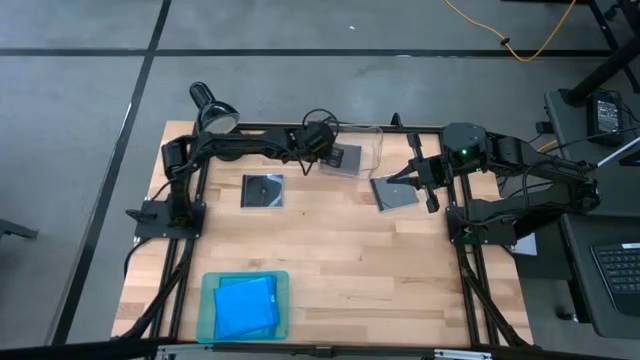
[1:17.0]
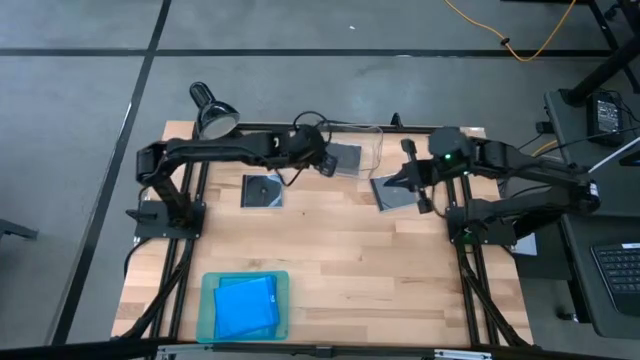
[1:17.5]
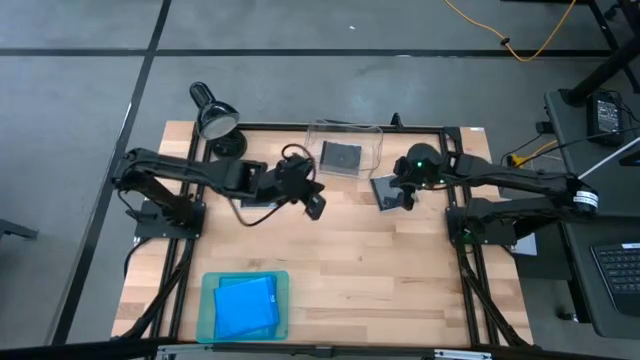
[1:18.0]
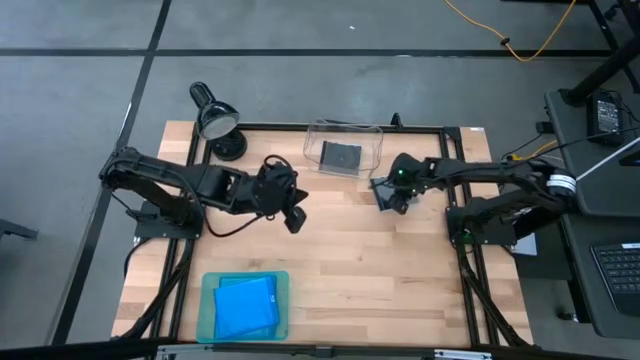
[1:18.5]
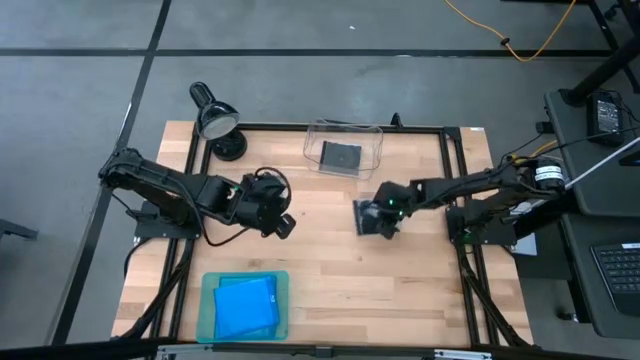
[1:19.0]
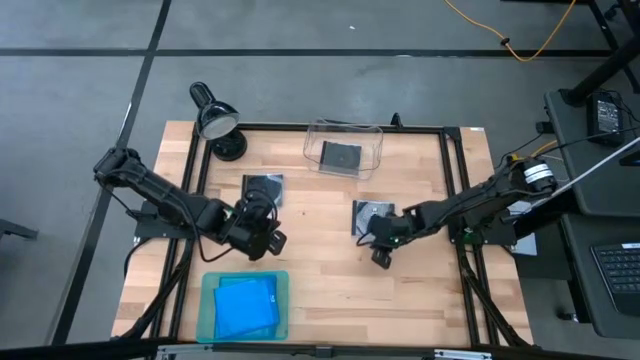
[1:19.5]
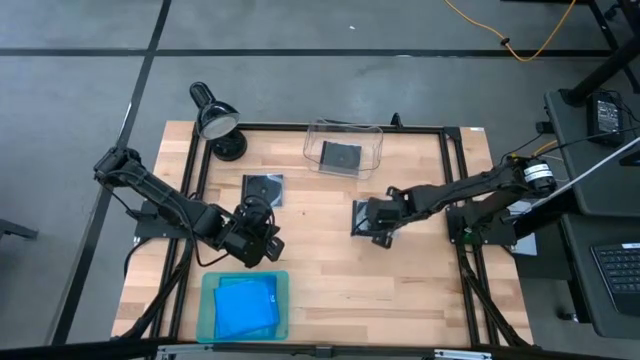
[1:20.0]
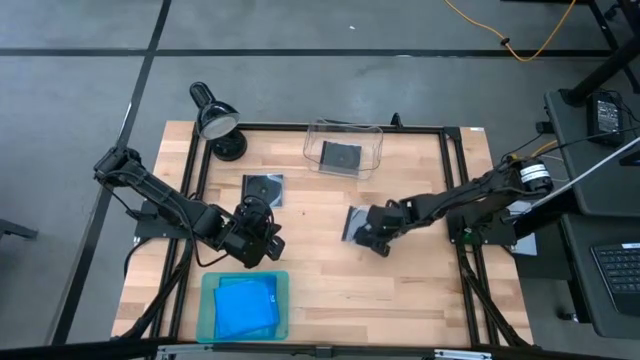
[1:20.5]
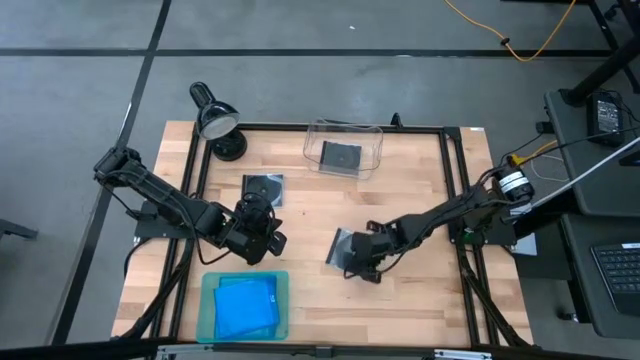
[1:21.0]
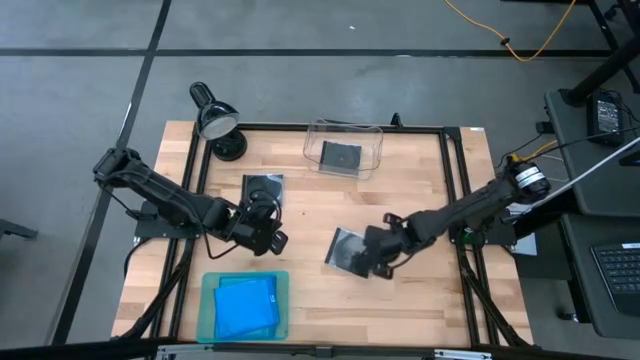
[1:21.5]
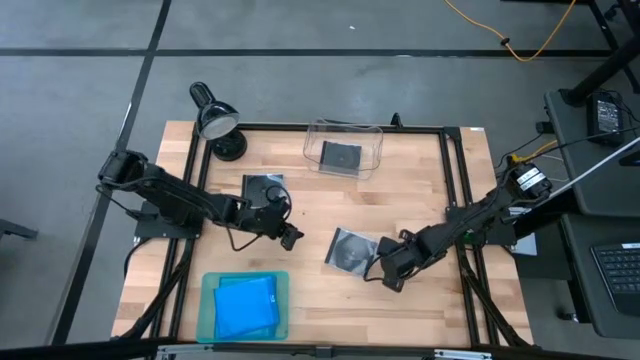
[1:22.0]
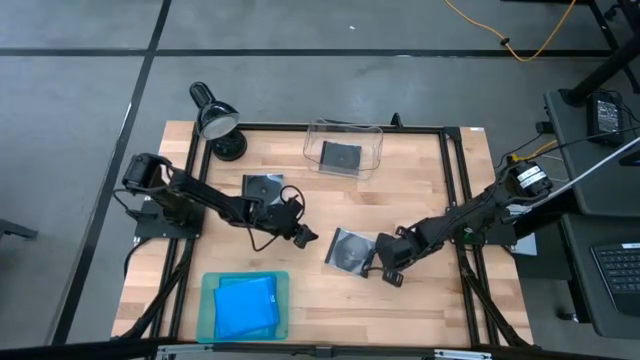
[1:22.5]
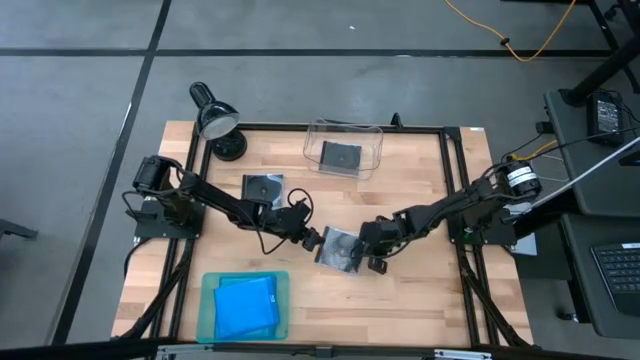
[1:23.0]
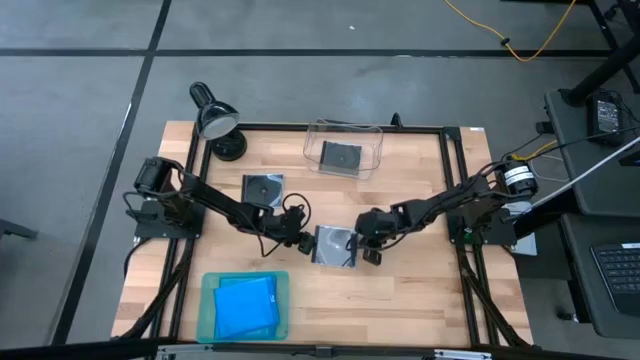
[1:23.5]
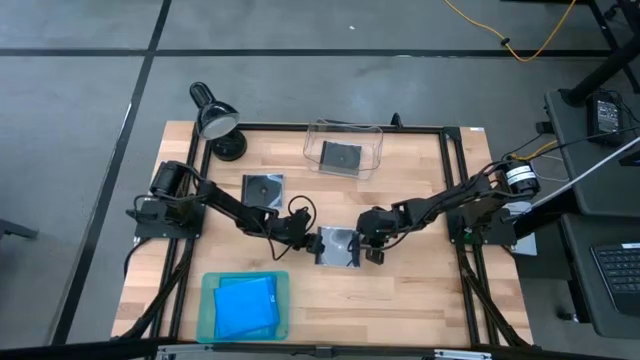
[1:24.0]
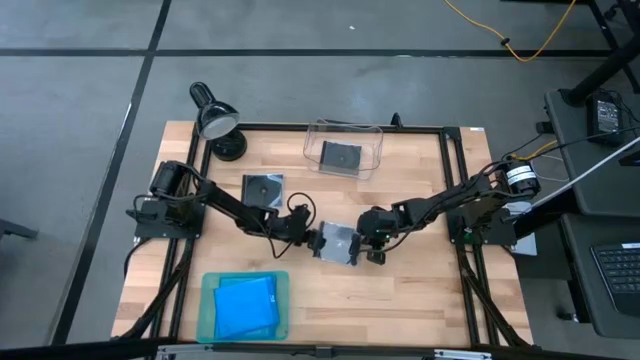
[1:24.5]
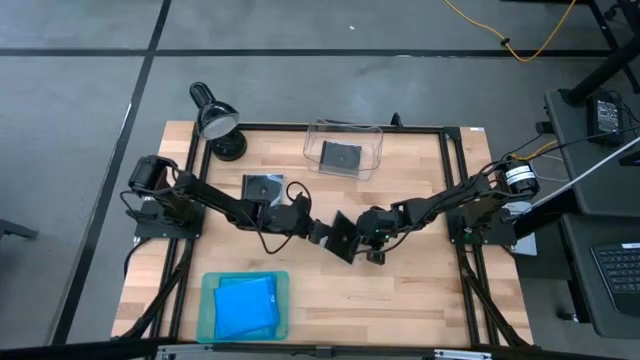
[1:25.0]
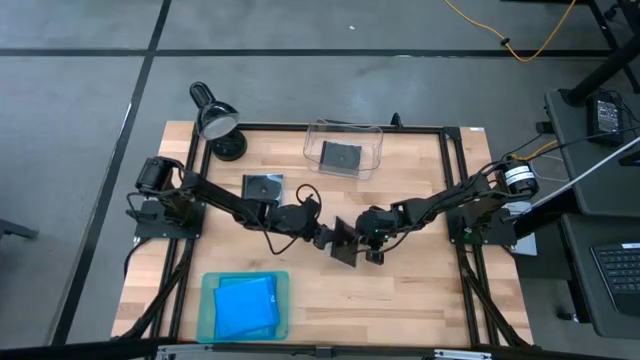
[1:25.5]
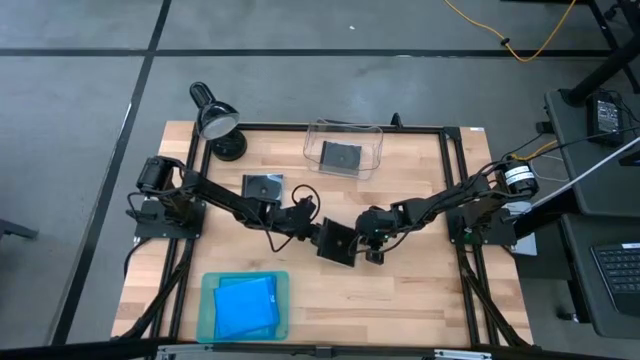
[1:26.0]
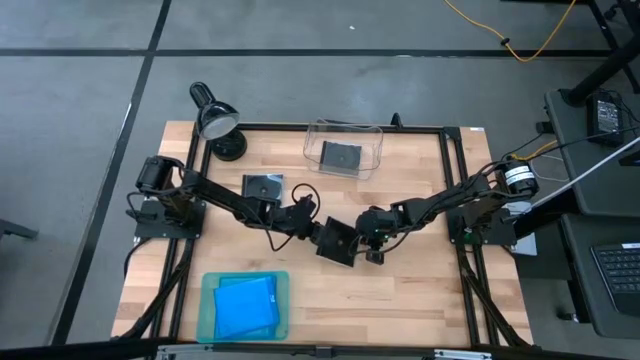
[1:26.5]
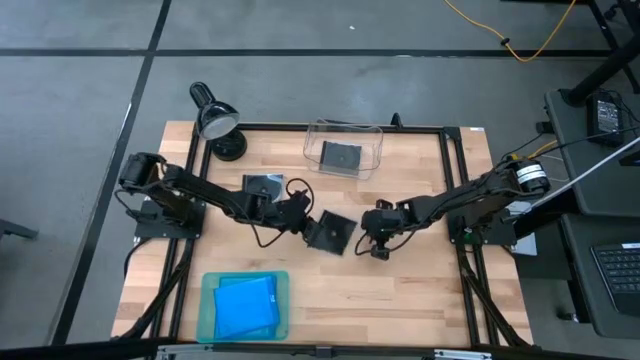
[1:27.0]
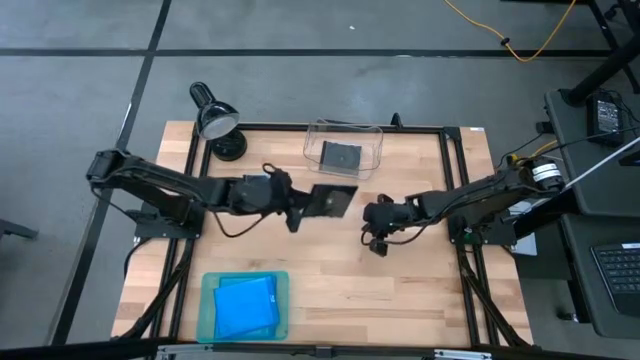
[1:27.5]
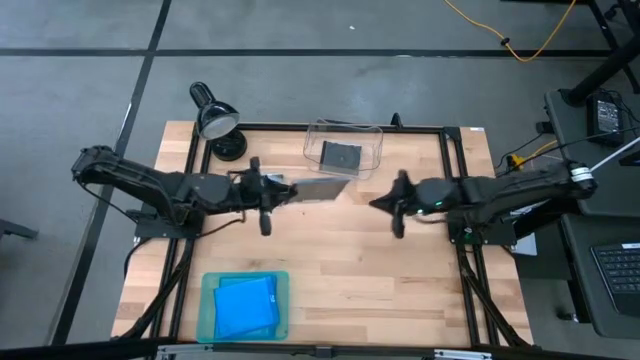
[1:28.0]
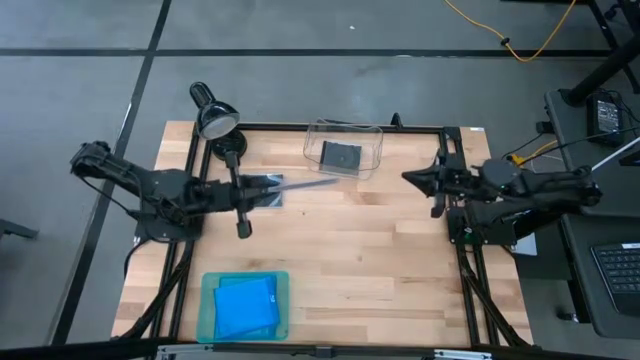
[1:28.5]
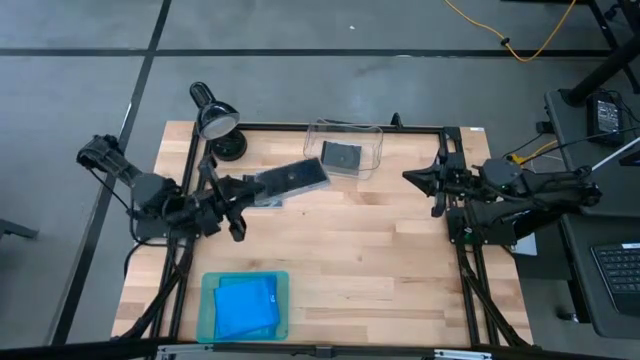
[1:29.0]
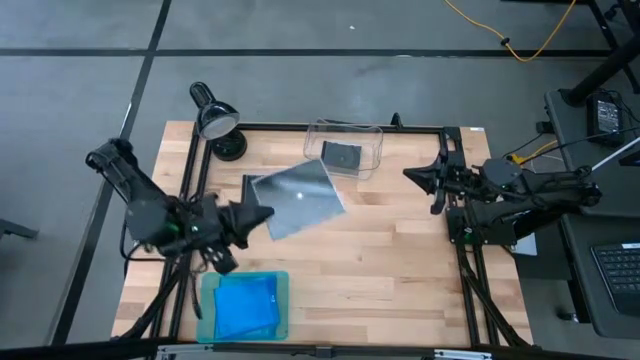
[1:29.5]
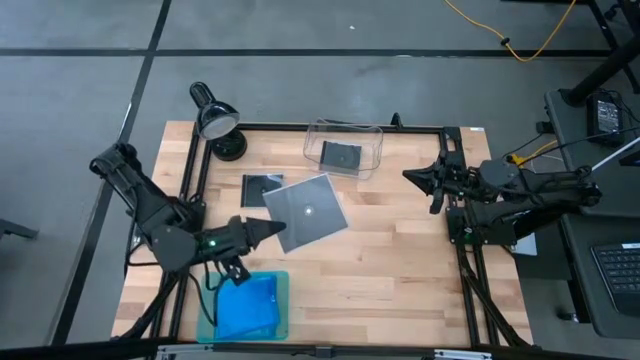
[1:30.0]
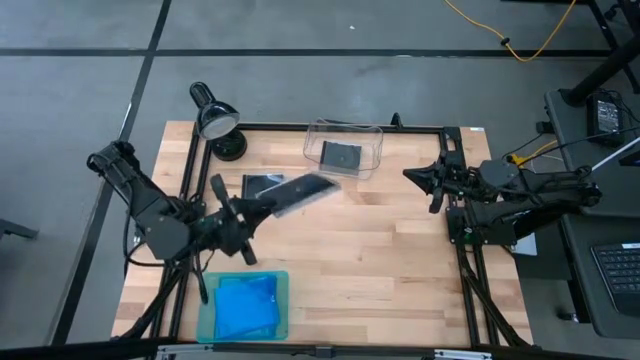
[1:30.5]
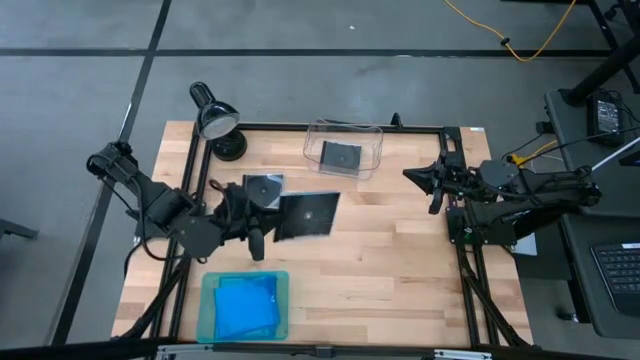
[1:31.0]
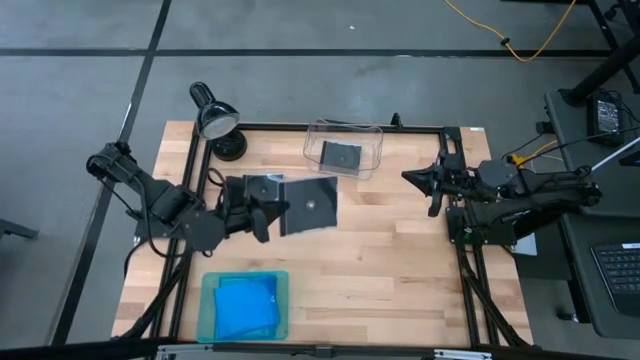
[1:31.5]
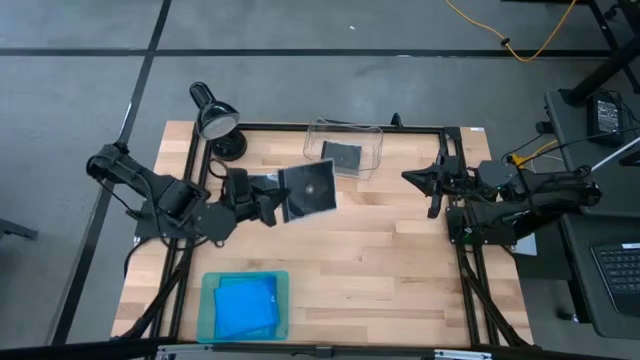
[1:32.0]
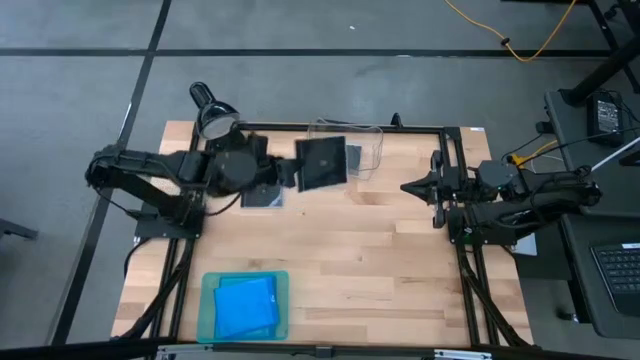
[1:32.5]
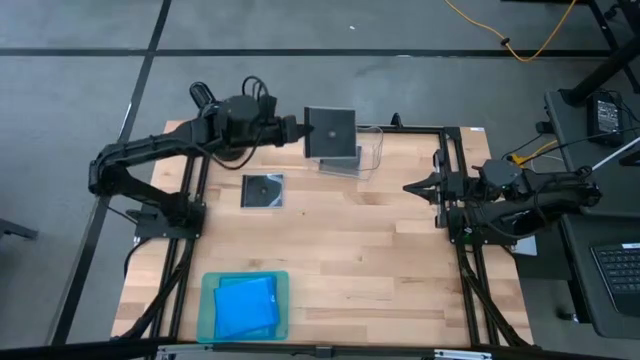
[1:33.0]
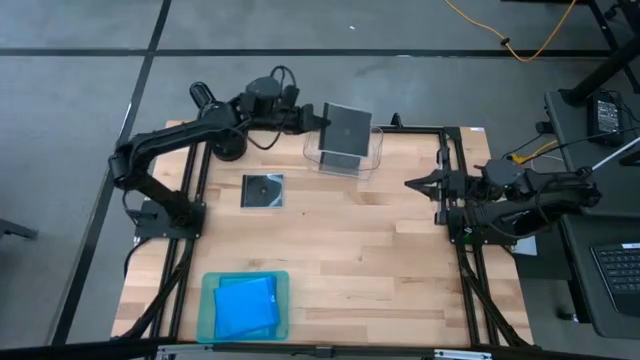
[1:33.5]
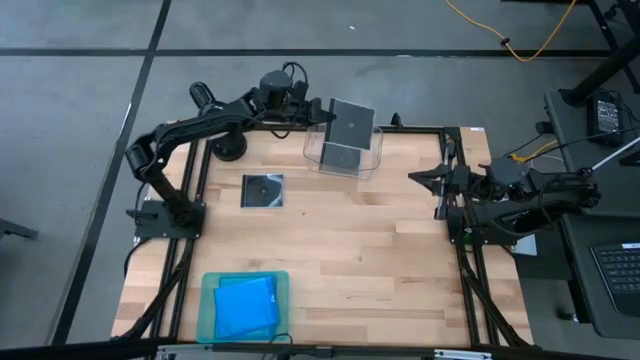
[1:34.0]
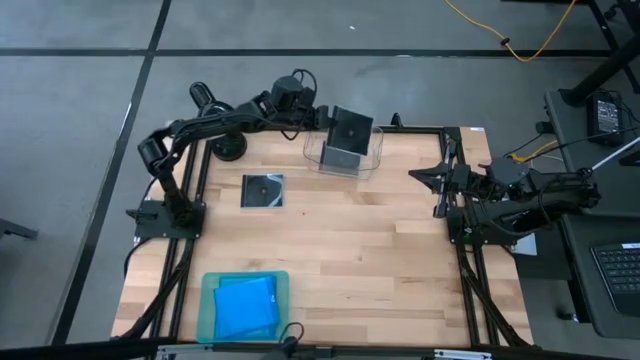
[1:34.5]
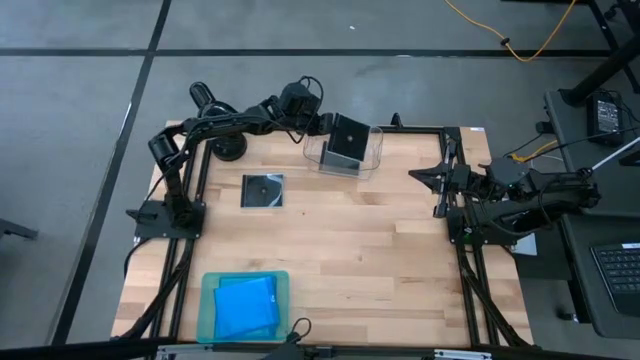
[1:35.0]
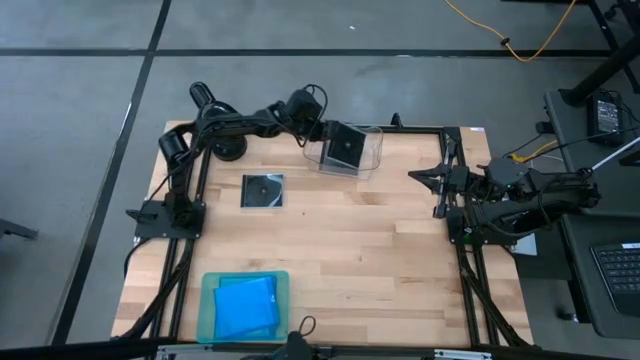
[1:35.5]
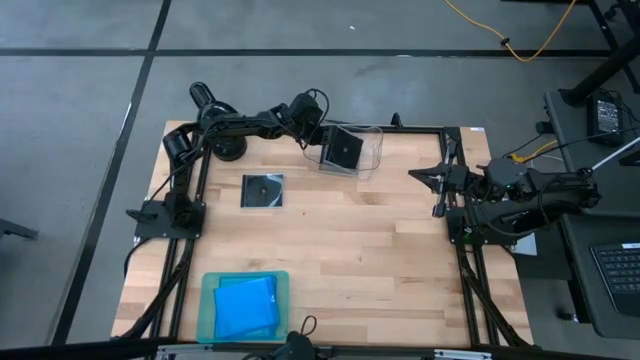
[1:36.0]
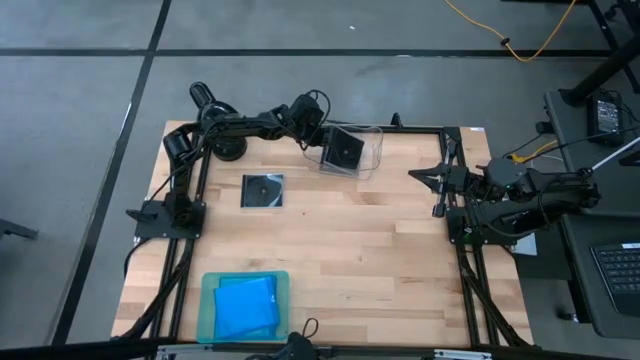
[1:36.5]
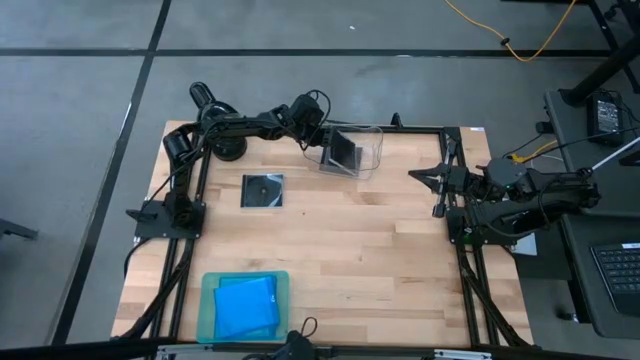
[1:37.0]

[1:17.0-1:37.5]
Task: Pick & place jewel cases by type
Put the right black CD case into the transparent bin

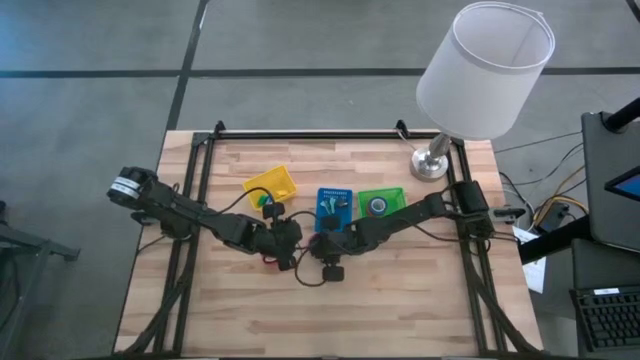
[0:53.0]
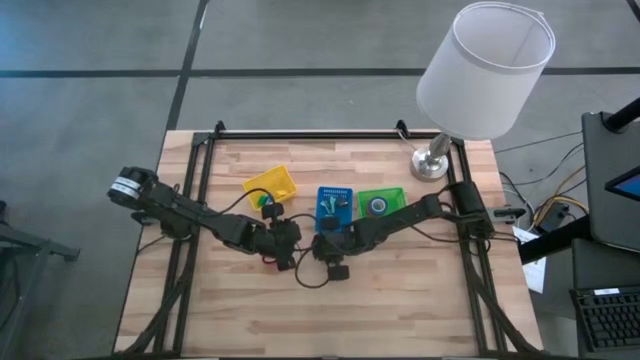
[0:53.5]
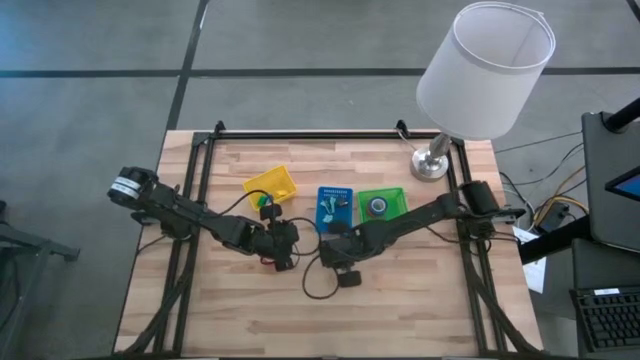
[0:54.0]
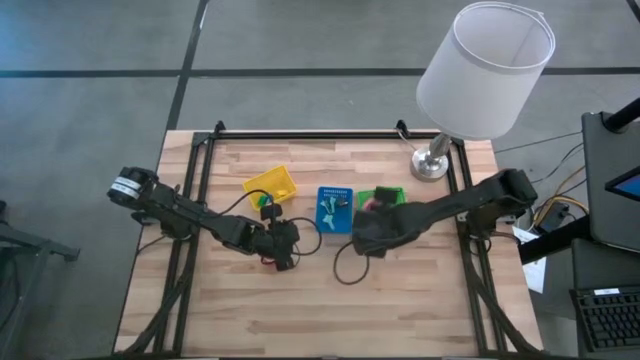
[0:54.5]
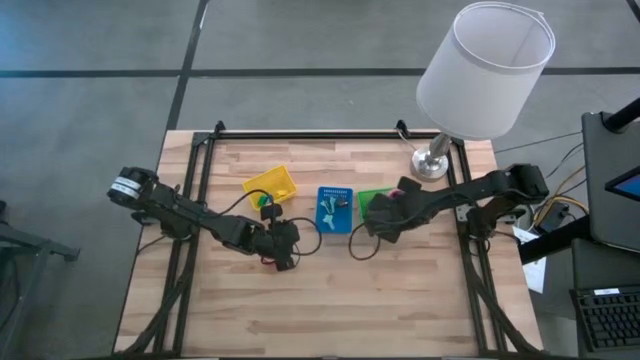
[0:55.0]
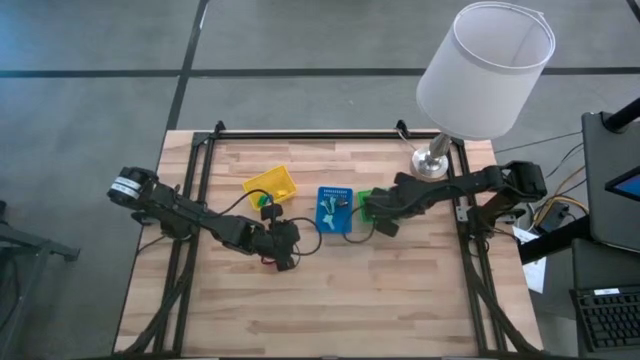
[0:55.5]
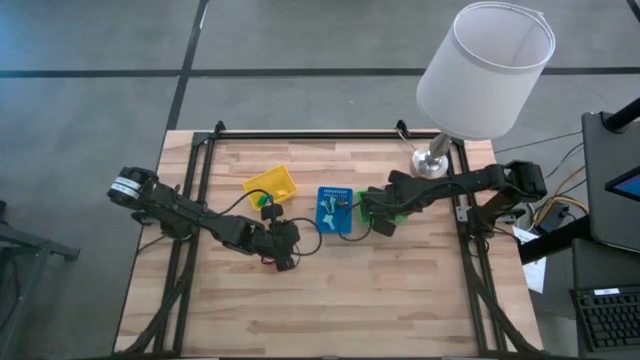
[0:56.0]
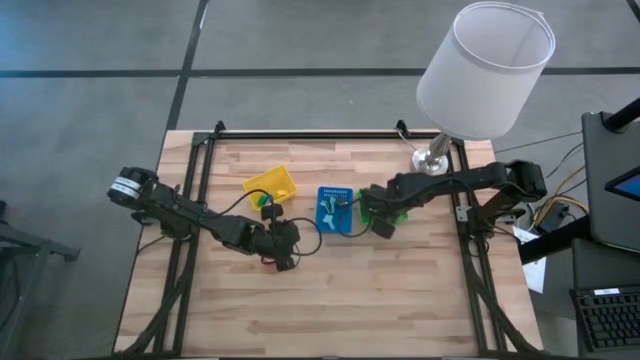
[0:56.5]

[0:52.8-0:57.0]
Task: Pick and place Stapler, Stapler remover, tape
Put the pink tape into the green basket
